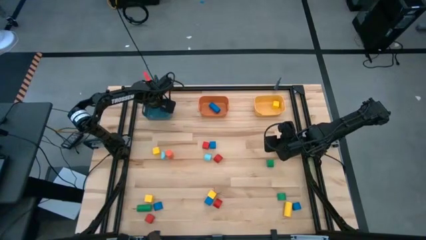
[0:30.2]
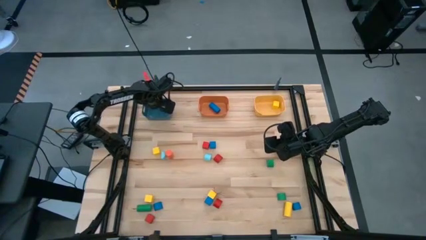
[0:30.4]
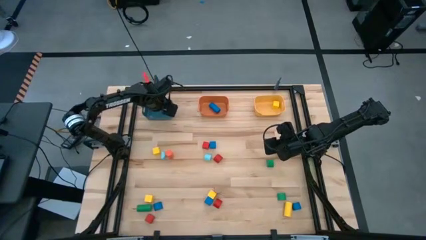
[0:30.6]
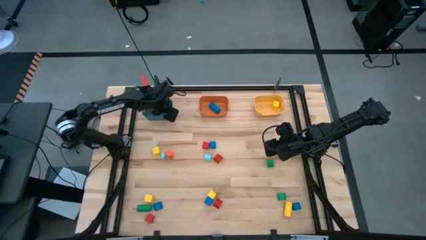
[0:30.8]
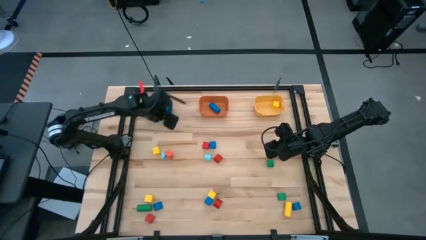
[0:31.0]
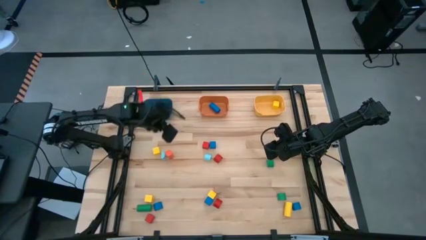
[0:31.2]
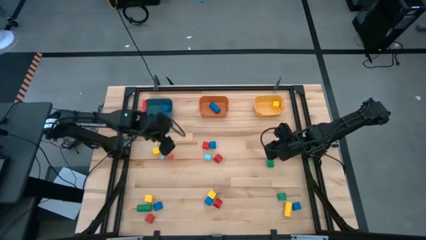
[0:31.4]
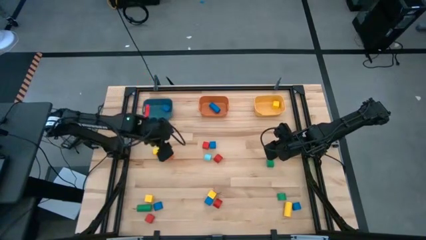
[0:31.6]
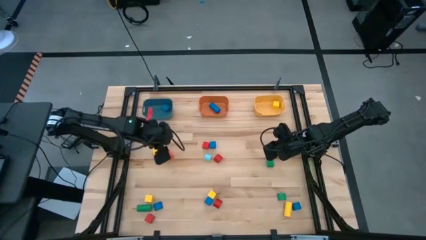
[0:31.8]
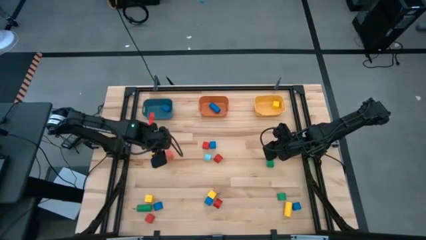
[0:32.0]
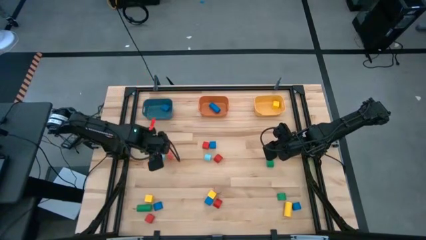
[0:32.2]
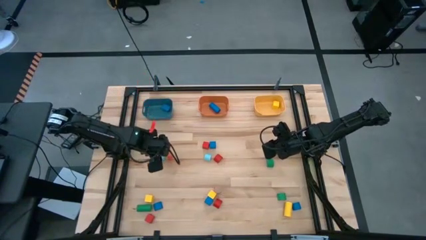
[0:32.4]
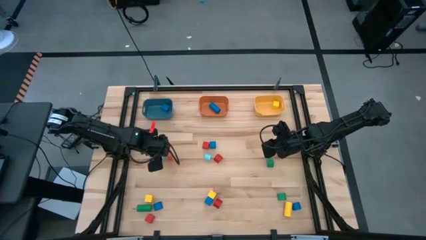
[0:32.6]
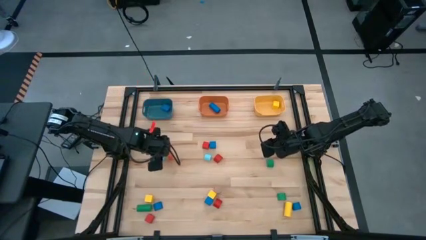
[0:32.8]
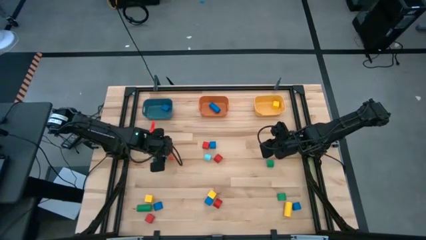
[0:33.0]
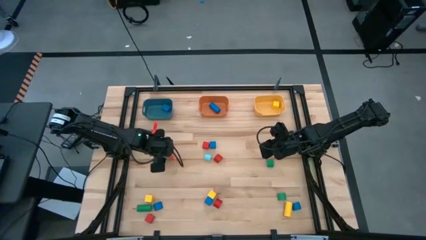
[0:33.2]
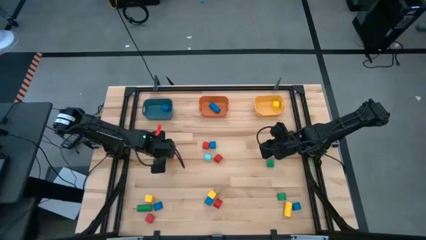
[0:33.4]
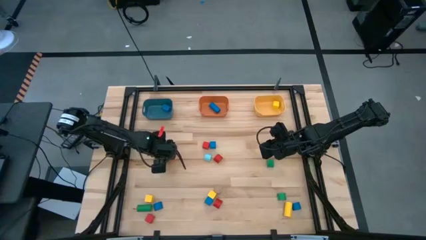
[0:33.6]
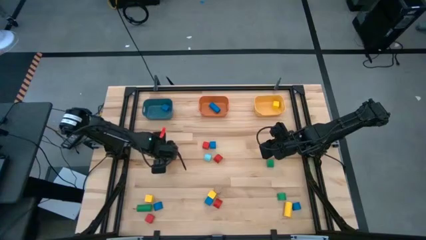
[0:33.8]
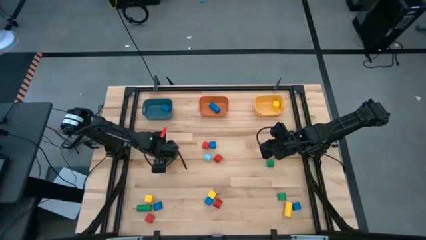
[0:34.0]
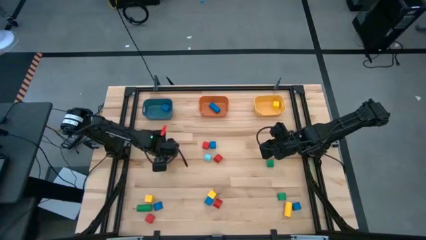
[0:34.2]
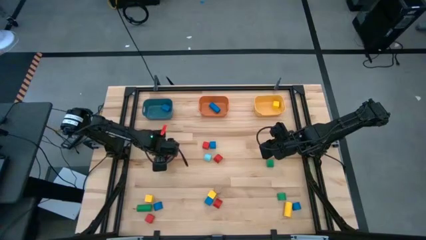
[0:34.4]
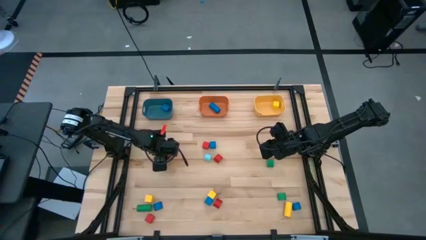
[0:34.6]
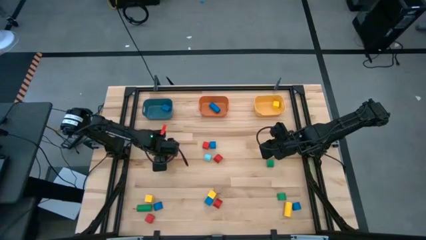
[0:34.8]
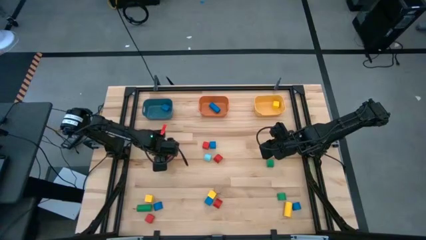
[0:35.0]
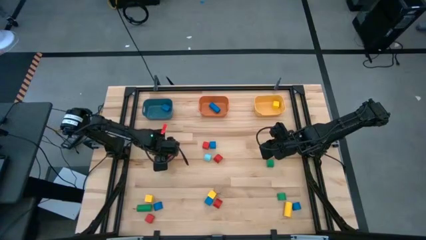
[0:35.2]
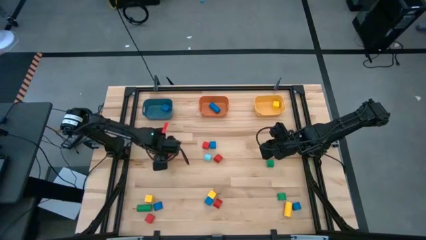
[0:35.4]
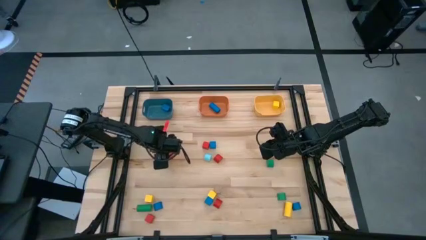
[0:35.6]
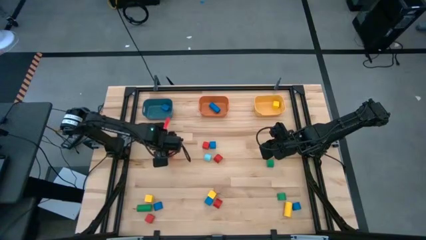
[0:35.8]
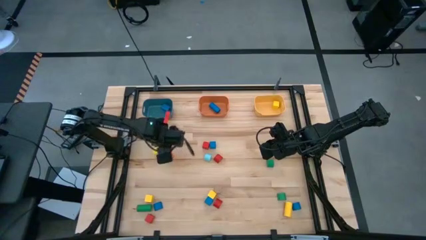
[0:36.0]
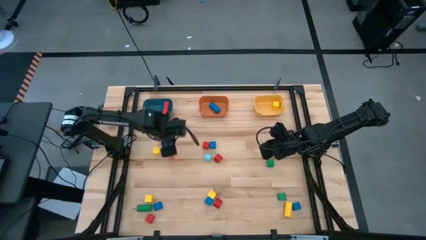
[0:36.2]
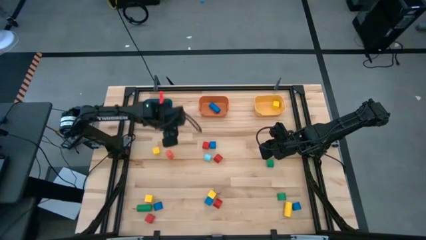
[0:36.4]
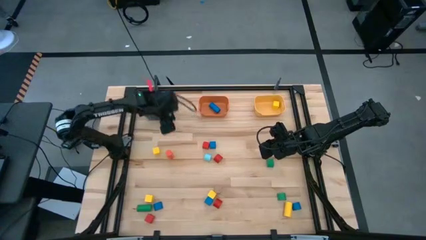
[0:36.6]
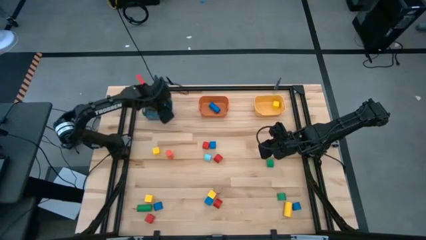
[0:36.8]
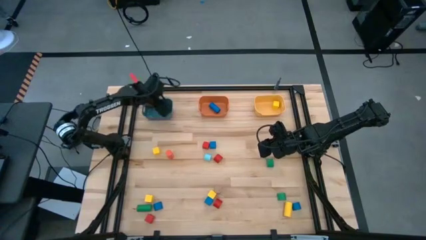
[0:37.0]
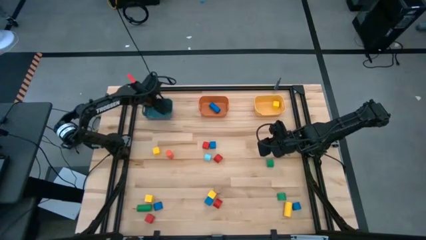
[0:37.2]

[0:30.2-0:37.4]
Task: Sort blocks by size
Put the light blue half-circle block into the blue bin

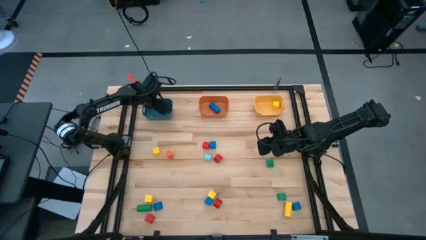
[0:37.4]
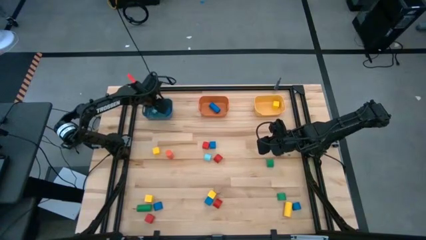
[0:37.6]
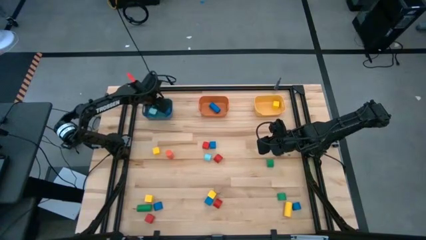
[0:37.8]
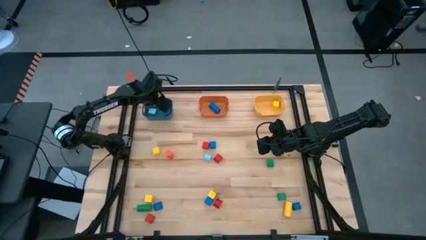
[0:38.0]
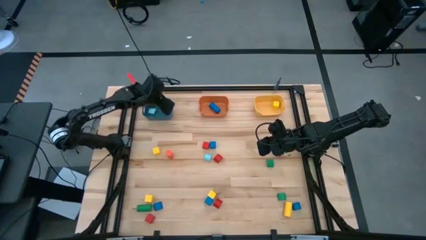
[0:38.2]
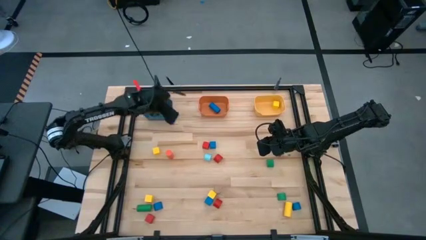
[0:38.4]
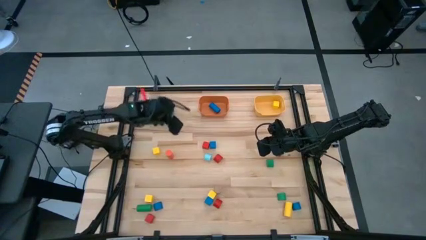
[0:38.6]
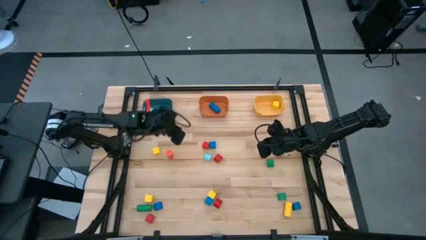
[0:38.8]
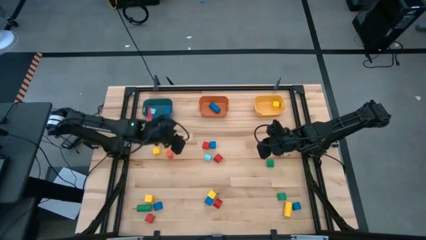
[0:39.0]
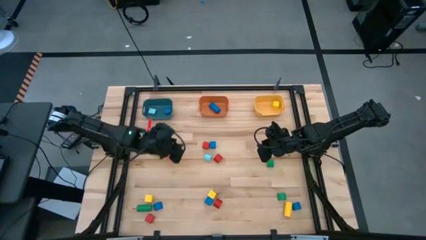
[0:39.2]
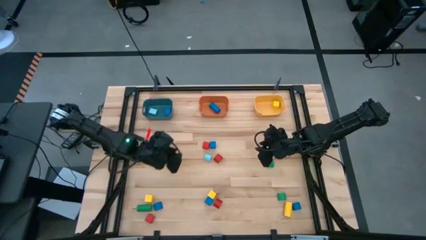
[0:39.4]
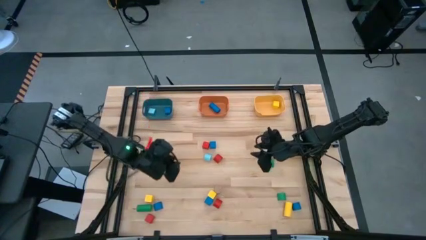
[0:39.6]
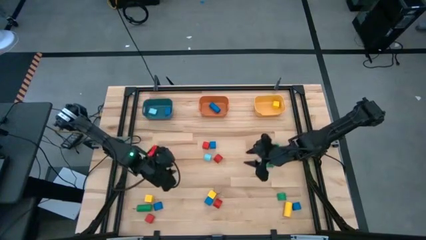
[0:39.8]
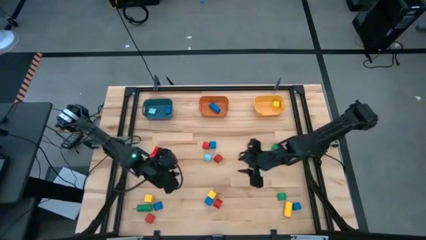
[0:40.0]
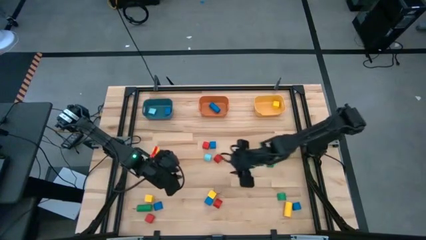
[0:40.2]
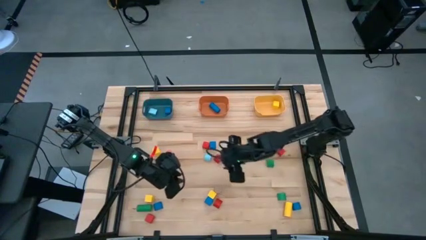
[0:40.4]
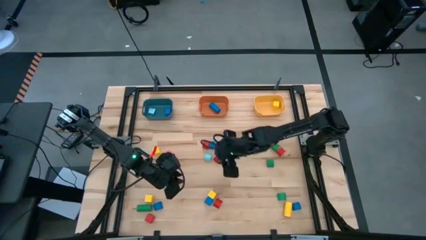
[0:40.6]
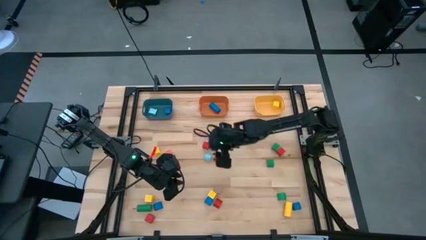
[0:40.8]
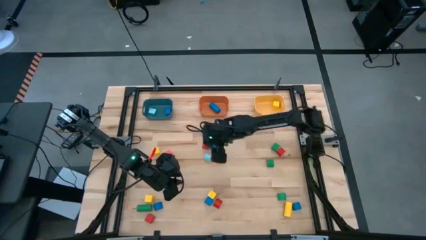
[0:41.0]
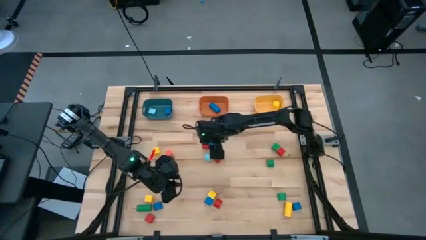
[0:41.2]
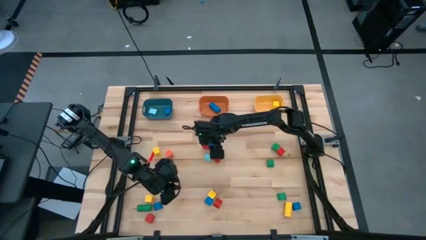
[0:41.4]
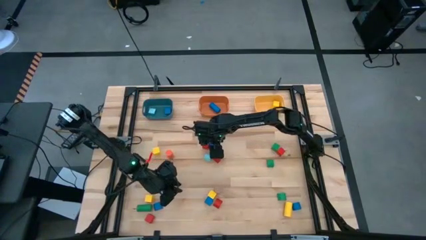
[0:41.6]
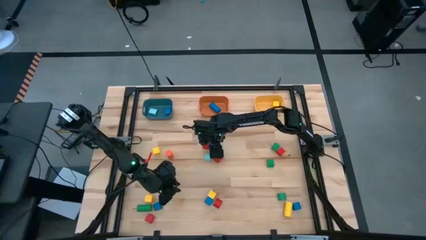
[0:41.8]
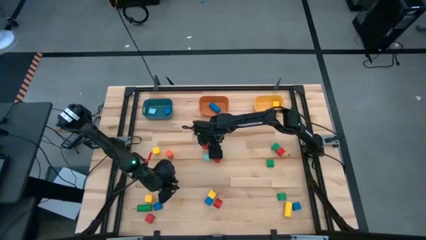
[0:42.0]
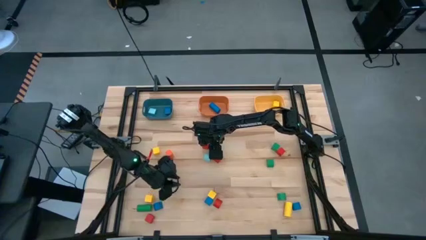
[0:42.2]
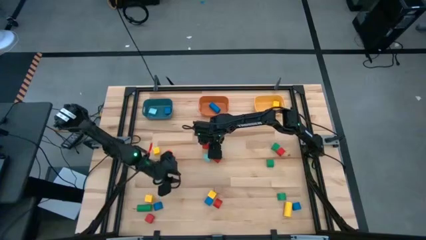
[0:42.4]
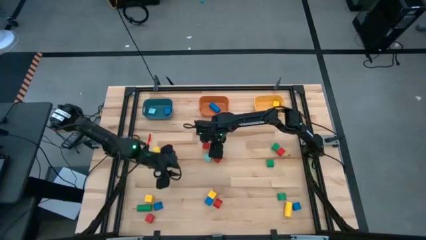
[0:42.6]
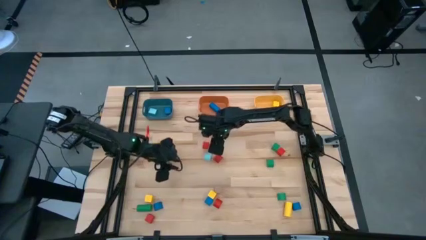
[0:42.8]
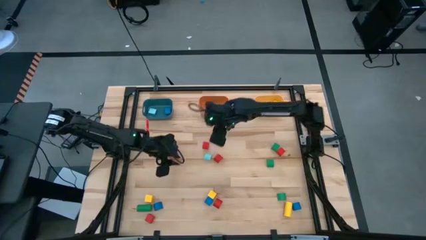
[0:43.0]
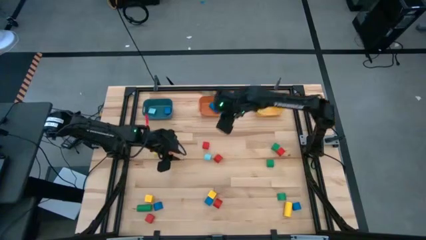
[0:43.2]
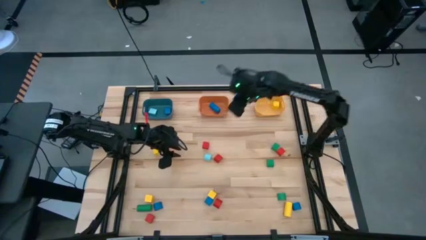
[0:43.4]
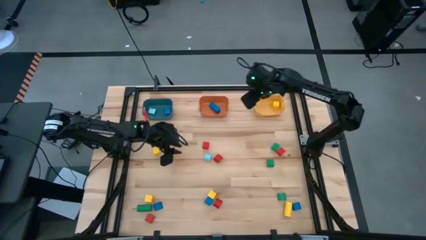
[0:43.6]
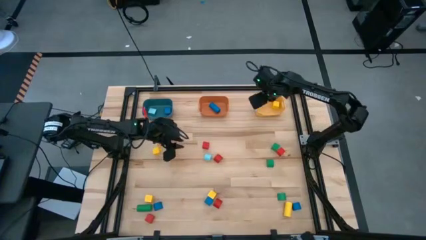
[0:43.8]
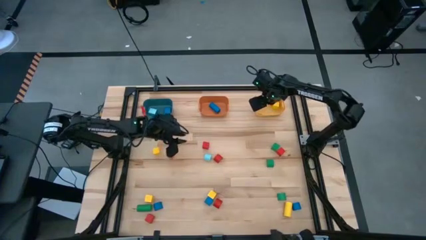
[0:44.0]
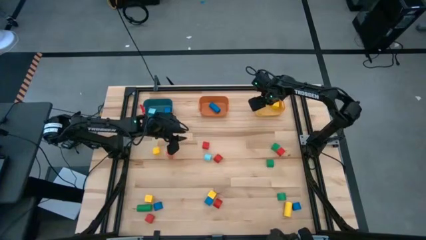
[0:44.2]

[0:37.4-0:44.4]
Put the blue cube block into the yellow bin

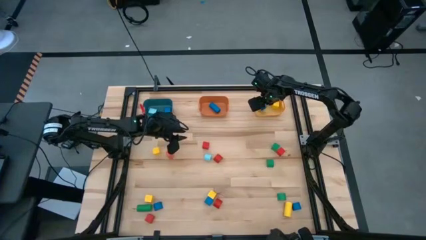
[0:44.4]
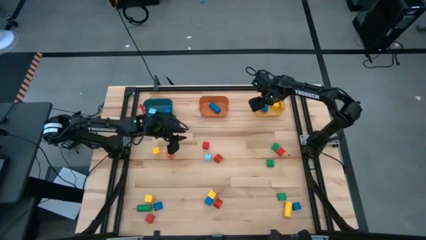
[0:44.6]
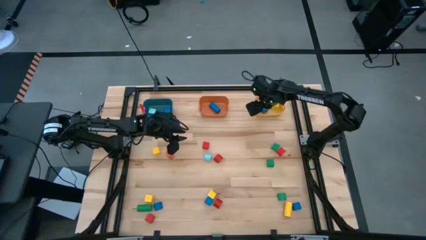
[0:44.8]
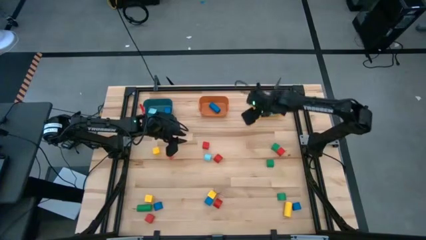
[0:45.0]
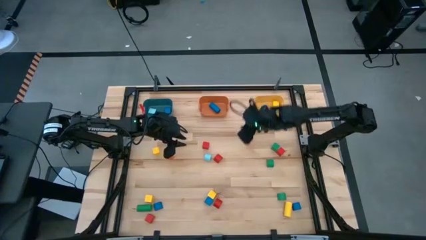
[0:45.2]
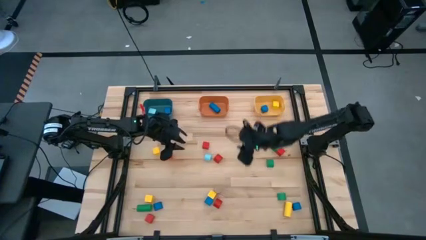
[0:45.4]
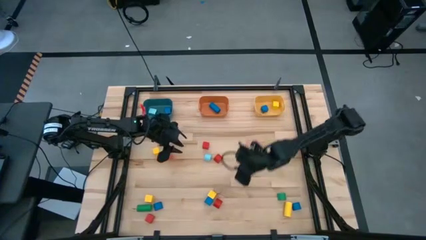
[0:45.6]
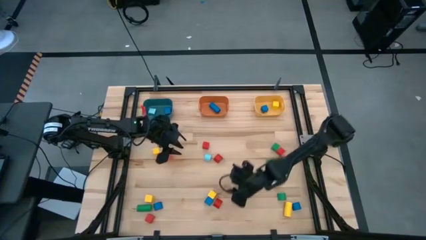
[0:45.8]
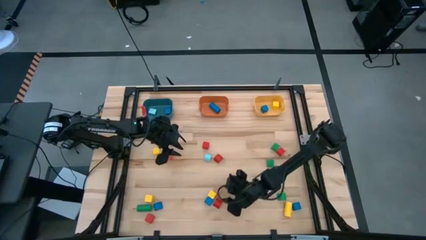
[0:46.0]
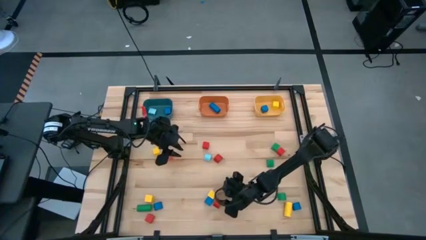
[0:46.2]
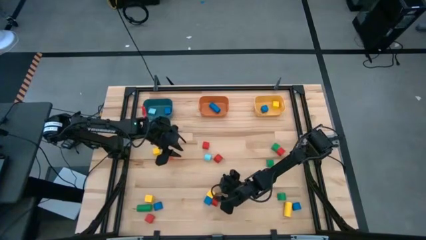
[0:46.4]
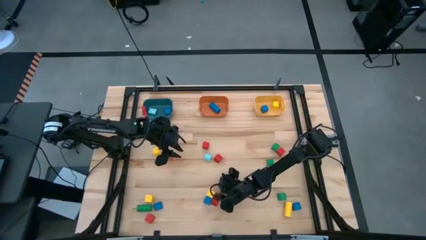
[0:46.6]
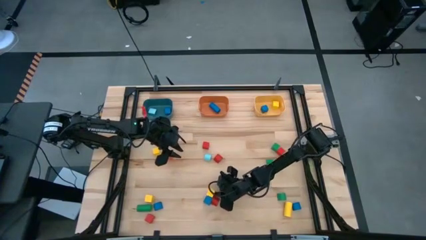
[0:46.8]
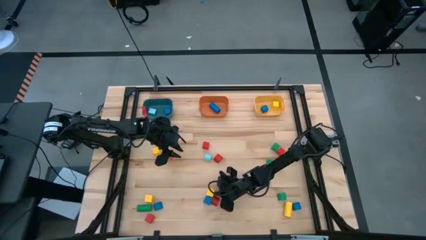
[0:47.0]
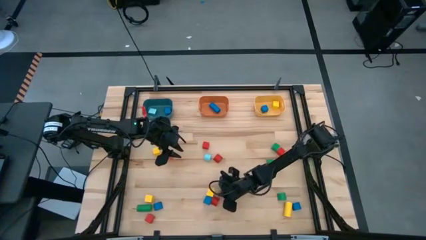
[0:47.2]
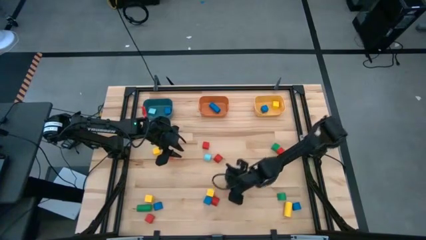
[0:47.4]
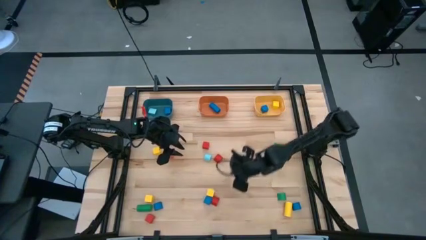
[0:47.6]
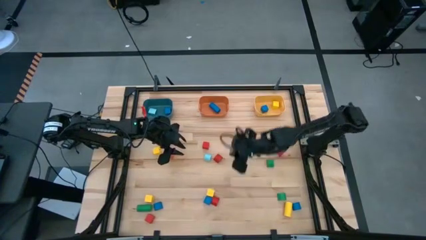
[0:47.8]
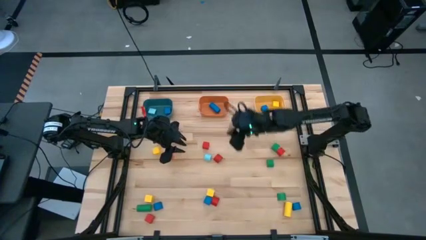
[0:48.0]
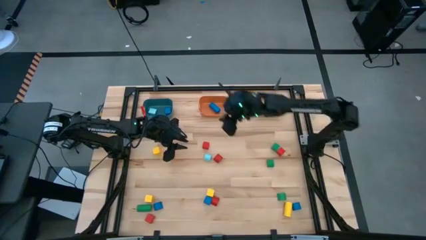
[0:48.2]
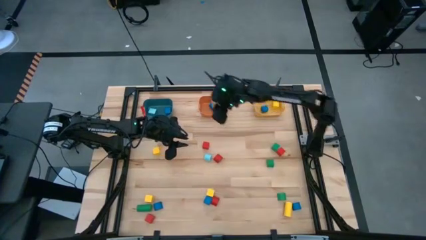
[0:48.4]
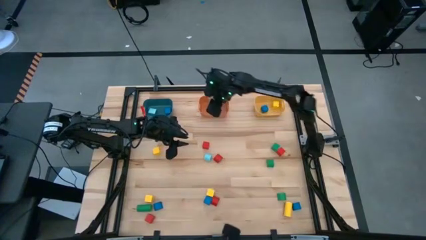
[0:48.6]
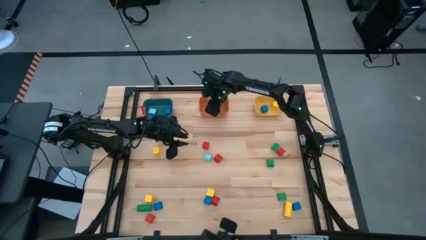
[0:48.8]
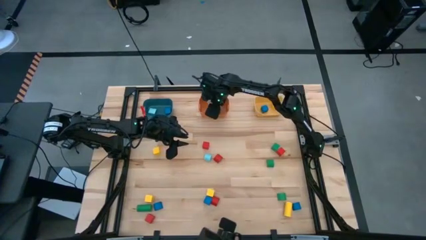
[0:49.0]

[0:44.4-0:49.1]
Put the brown cylindrical block into the orange bin
